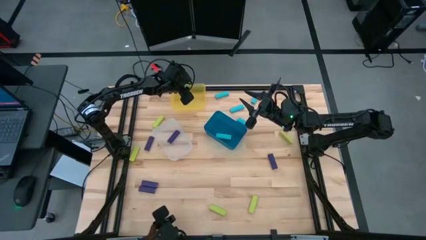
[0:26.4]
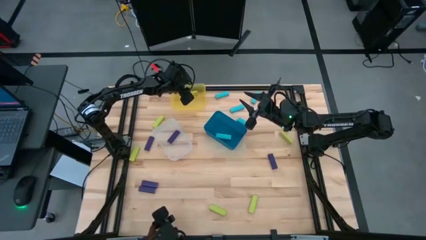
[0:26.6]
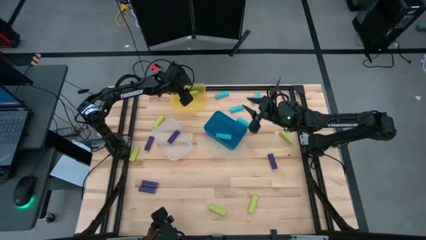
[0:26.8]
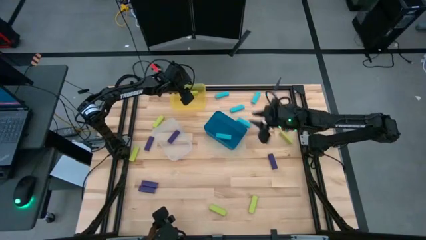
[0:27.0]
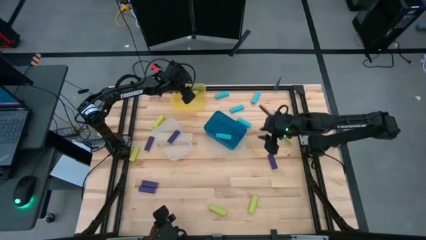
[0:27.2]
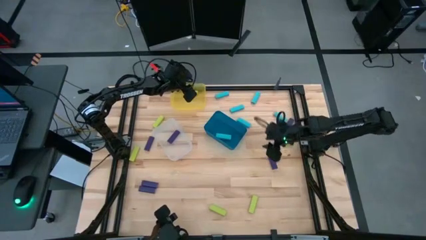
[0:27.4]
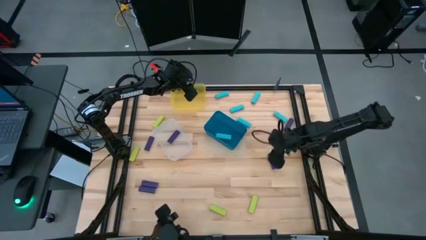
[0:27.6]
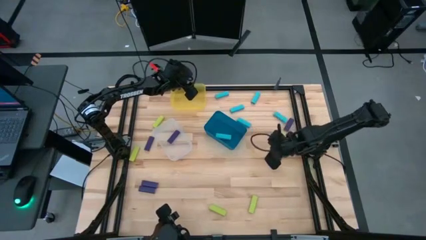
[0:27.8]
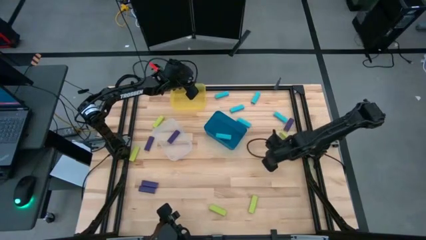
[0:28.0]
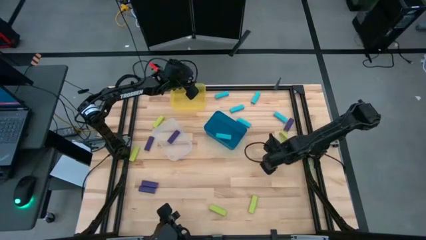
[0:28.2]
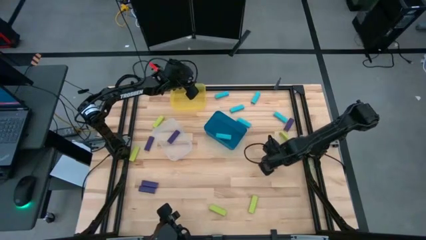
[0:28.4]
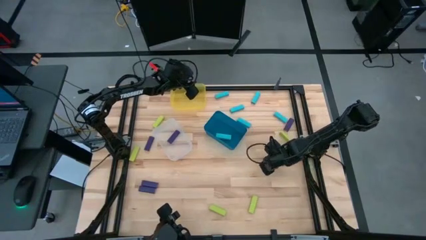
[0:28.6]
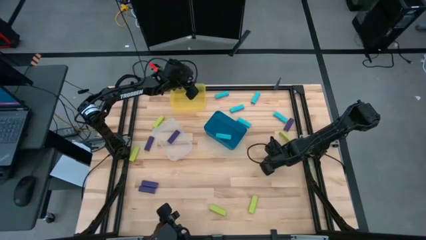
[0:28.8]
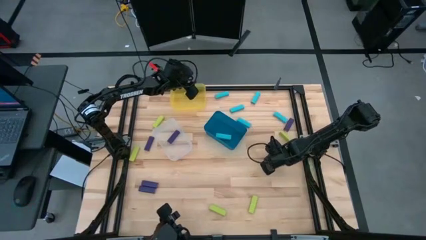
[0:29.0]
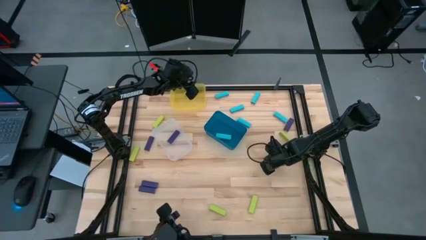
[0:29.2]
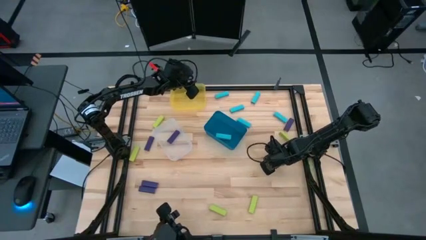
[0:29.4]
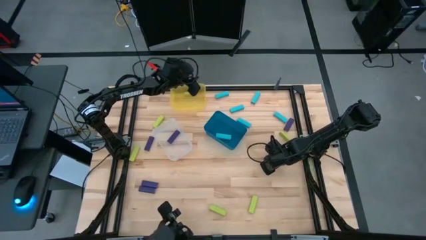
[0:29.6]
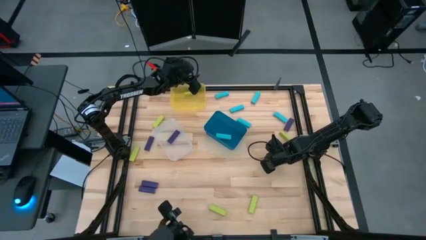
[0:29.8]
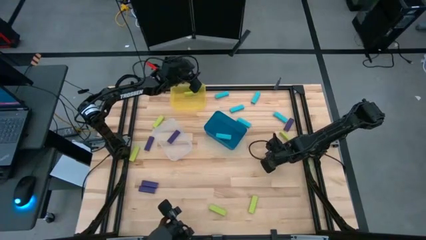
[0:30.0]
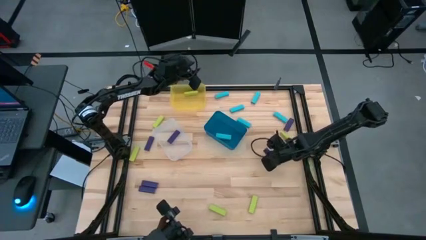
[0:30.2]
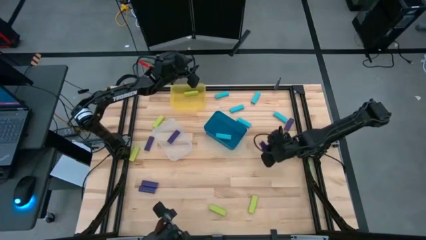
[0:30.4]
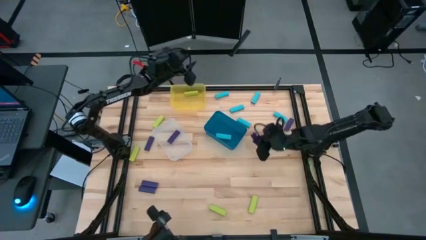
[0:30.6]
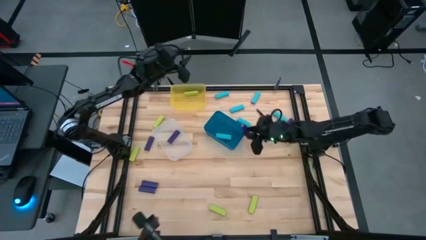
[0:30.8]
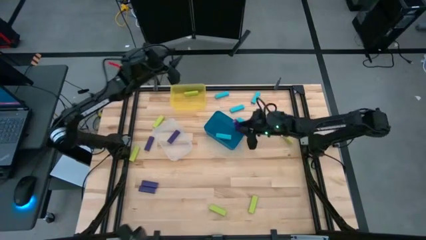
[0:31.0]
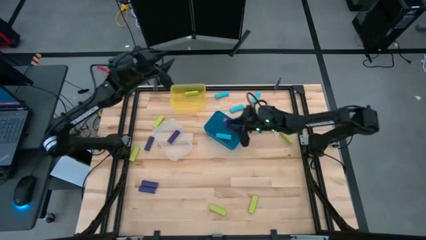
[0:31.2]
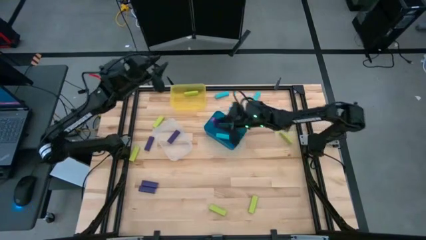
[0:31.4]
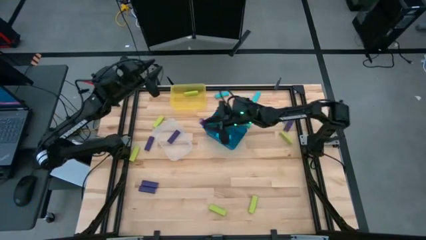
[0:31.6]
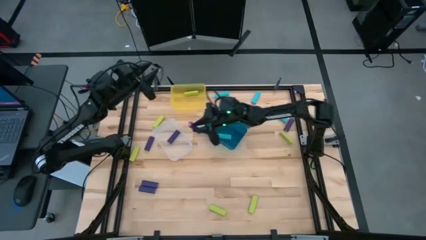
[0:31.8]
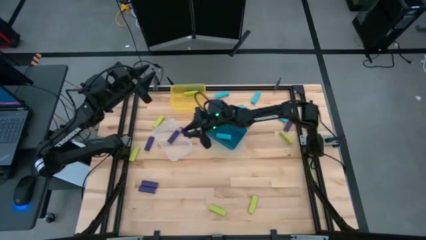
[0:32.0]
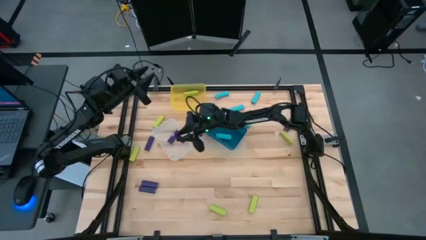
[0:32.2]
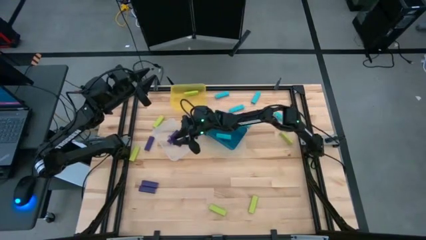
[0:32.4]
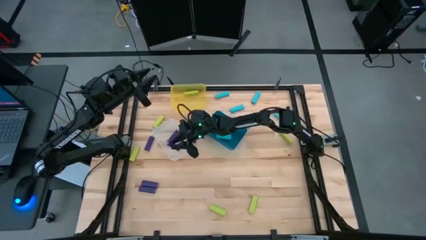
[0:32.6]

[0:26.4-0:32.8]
Task: Sort blocks
Put the violet block into the transparent bin

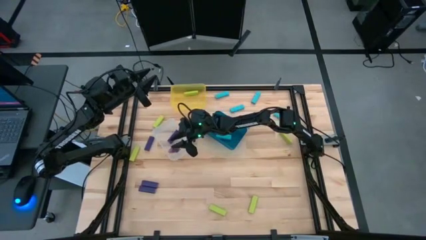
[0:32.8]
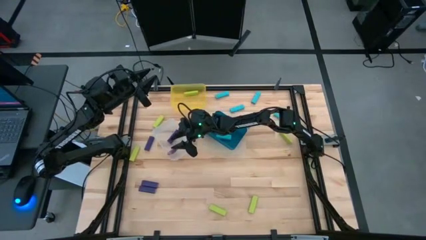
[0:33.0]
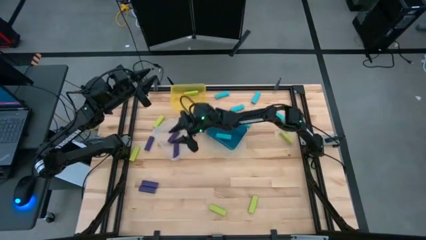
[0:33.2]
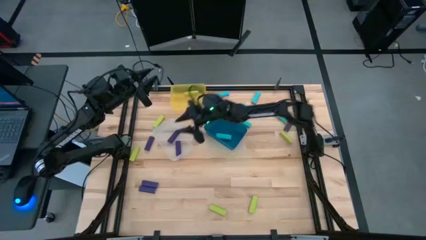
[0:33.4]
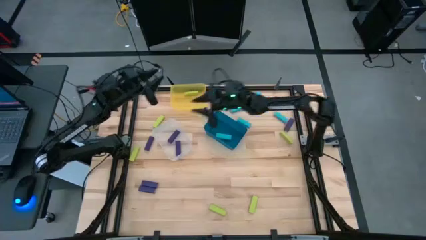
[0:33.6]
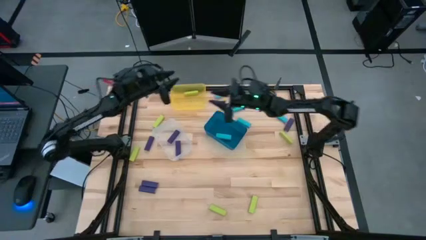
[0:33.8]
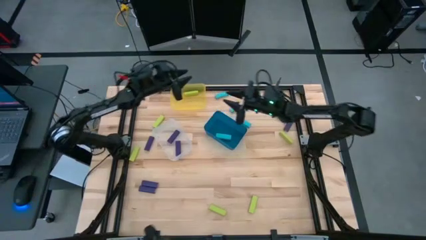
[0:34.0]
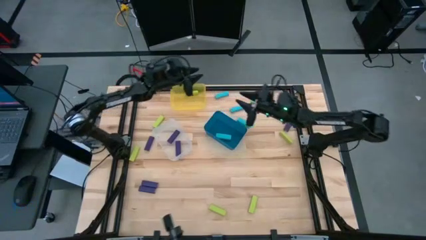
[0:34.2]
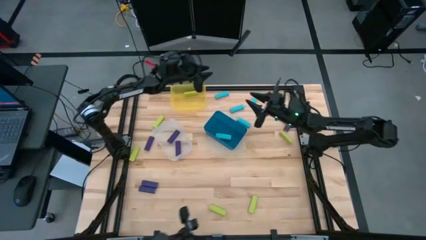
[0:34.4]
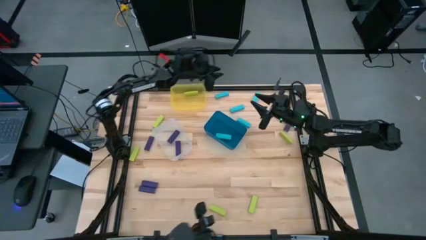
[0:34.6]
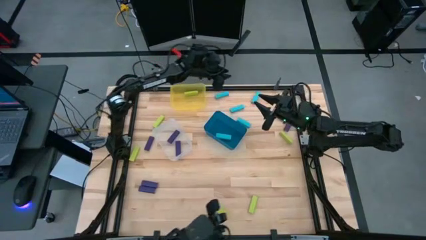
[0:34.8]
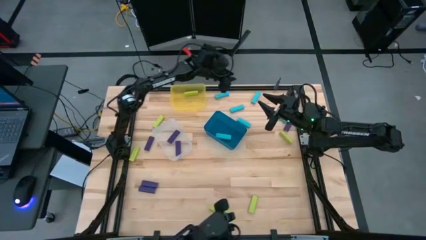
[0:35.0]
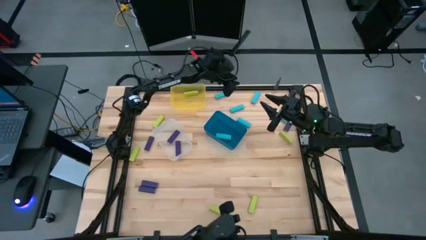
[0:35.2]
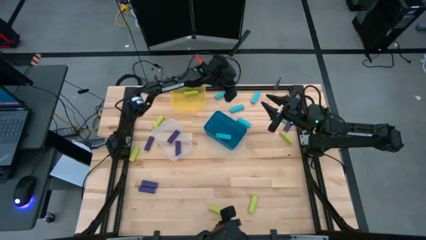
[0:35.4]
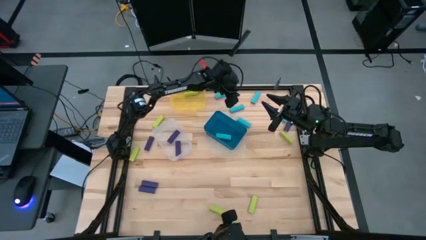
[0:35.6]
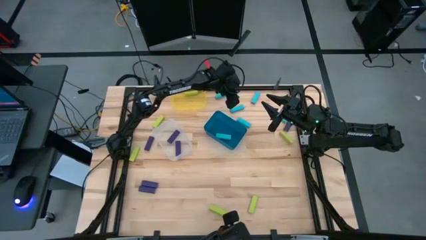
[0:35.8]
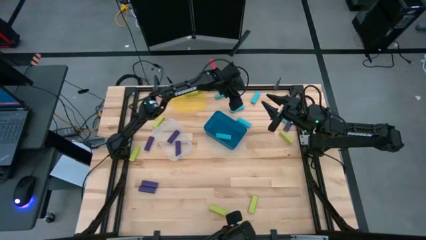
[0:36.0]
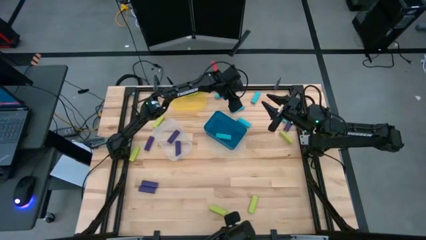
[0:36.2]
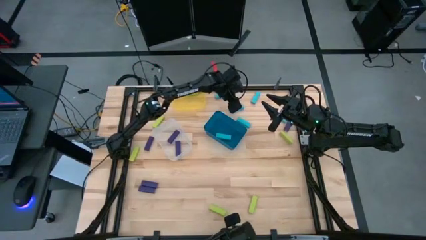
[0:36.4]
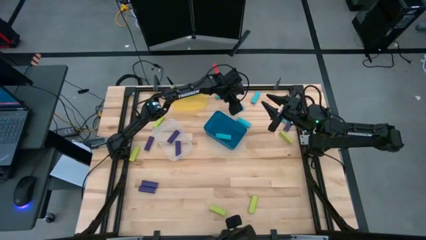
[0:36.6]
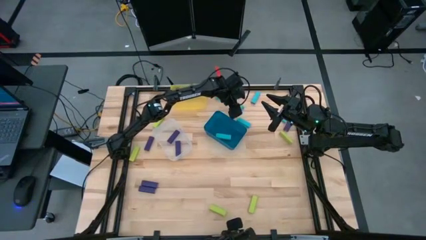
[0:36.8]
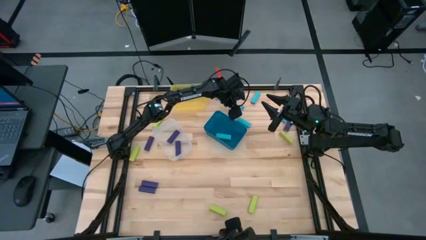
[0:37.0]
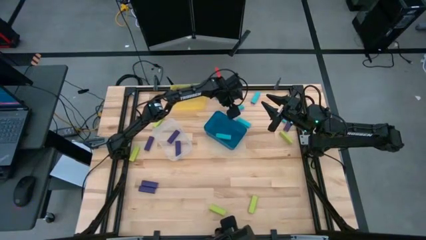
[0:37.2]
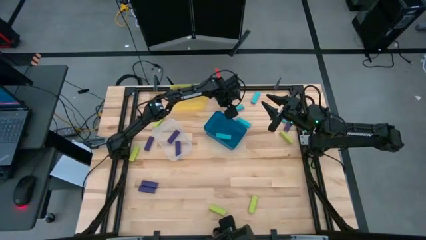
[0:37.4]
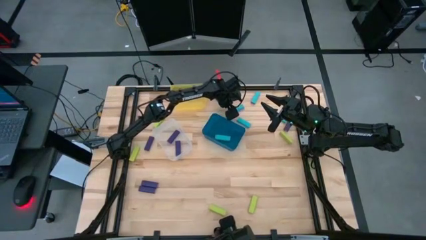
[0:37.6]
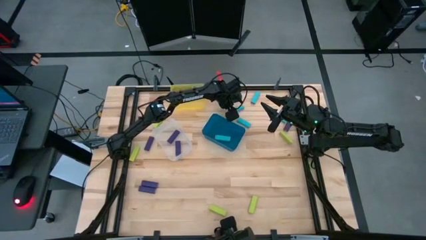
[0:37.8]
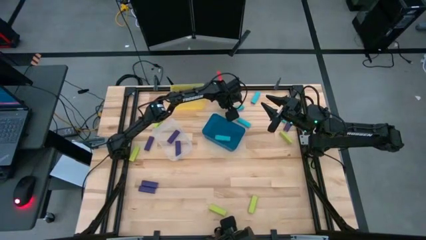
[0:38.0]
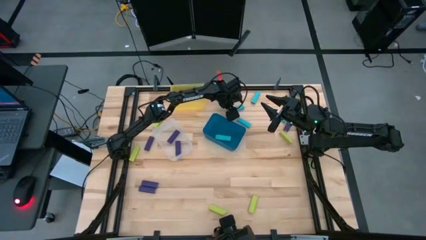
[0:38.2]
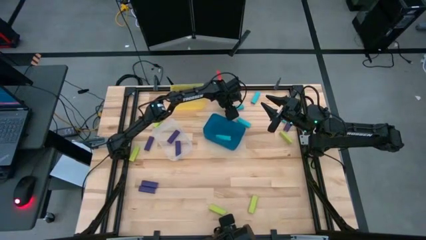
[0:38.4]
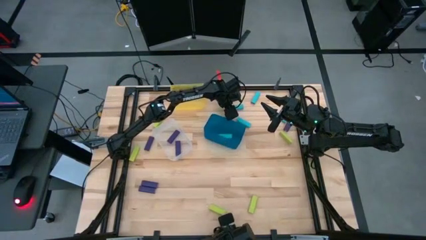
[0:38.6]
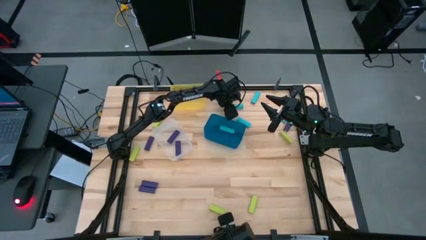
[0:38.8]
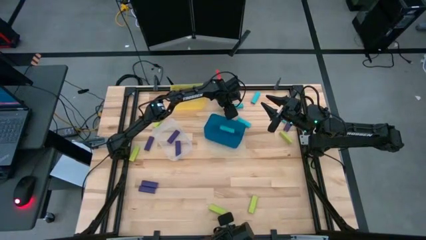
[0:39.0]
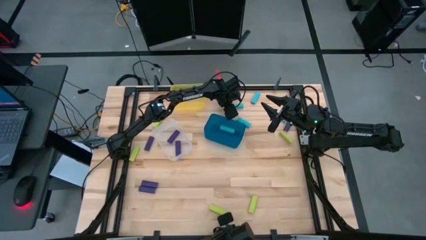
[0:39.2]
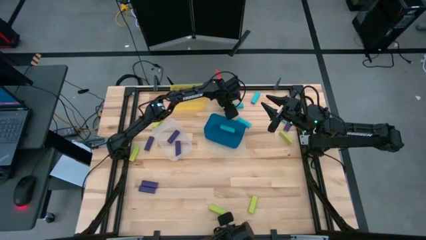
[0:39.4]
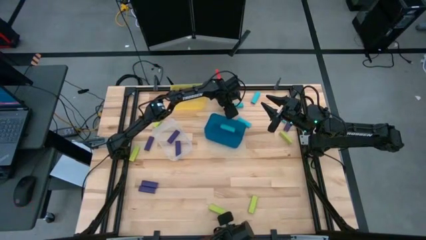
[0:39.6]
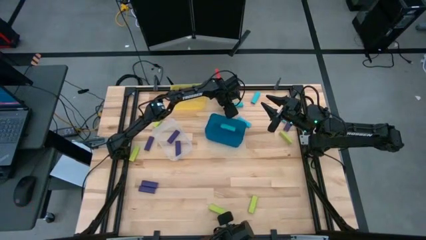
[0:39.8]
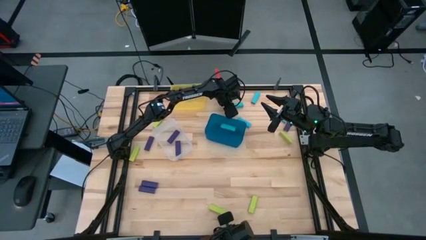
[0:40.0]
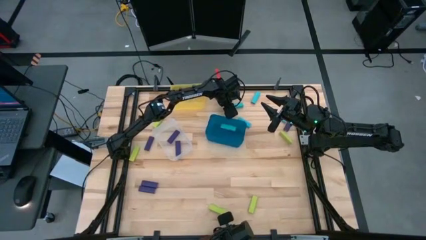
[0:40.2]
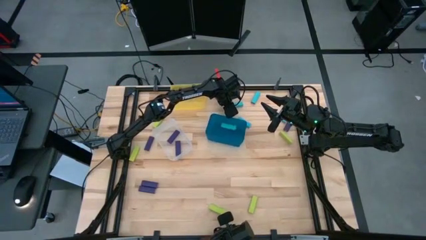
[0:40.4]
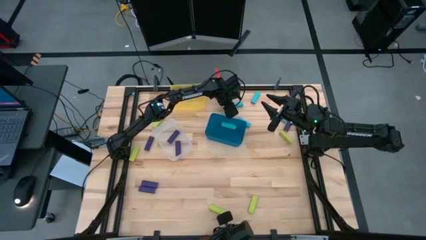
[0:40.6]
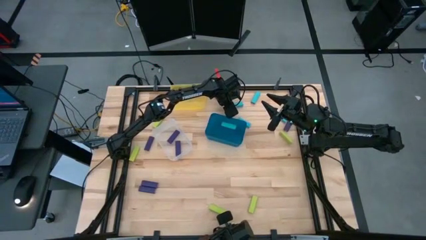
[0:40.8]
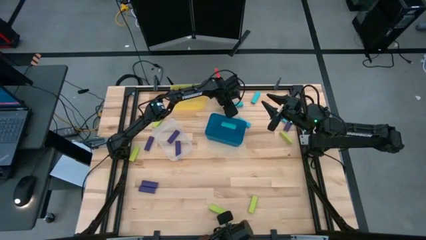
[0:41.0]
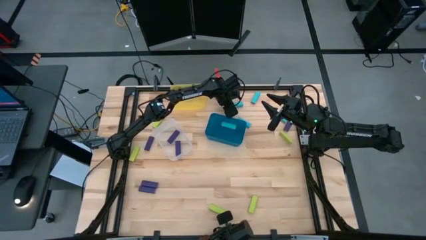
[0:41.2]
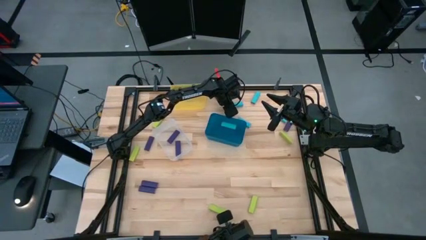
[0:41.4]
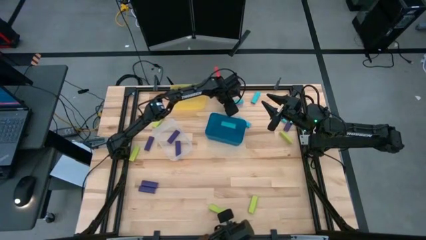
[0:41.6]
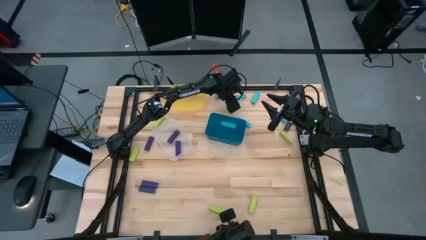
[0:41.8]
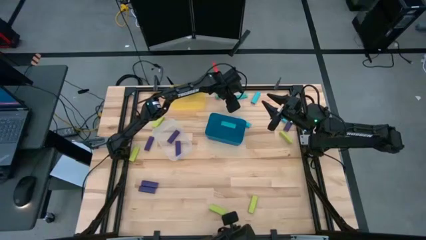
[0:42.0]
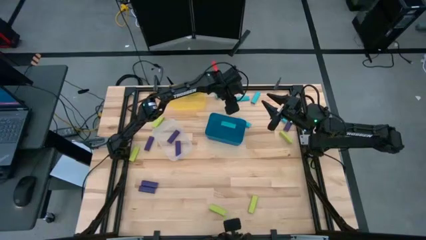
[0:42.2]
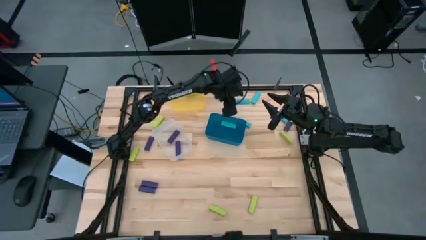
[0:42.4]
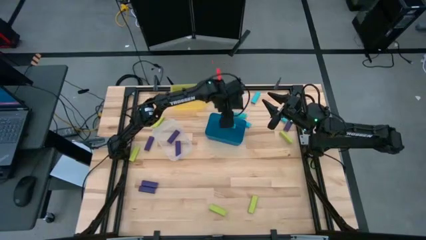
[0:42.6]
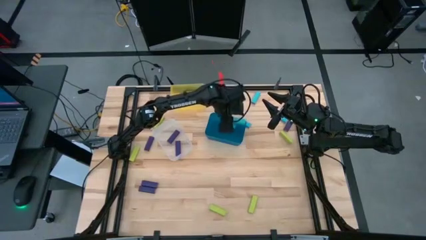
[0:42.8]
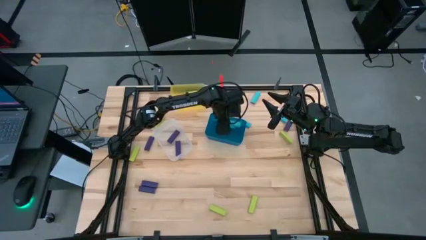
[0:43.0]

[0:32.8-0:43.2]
Put the blue block into the blue bin
